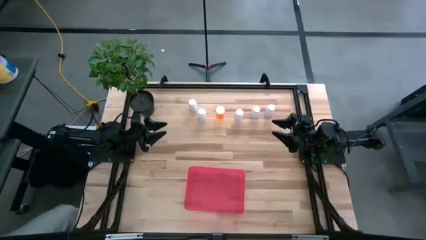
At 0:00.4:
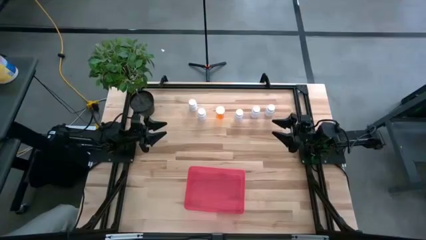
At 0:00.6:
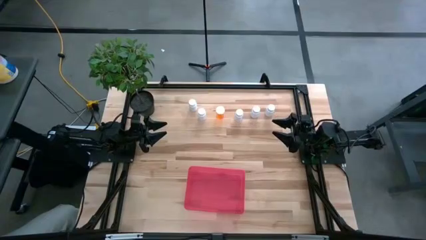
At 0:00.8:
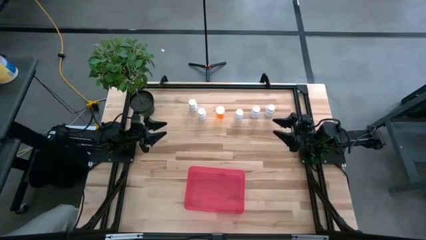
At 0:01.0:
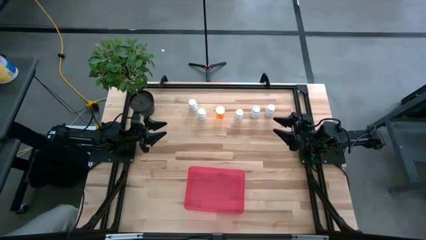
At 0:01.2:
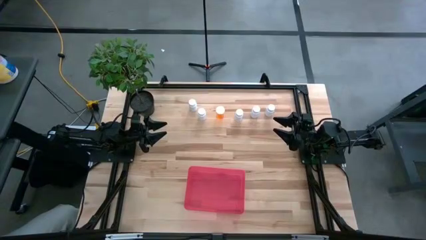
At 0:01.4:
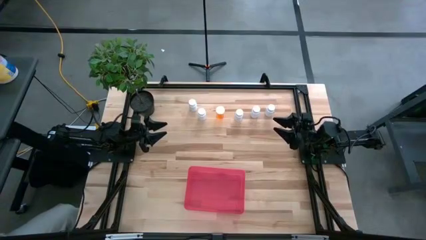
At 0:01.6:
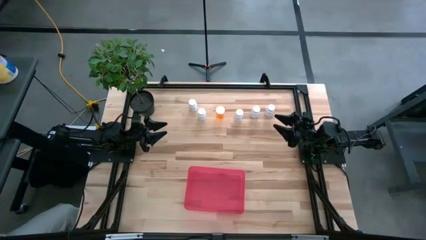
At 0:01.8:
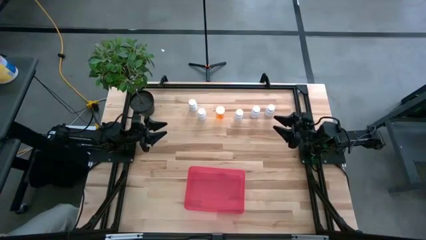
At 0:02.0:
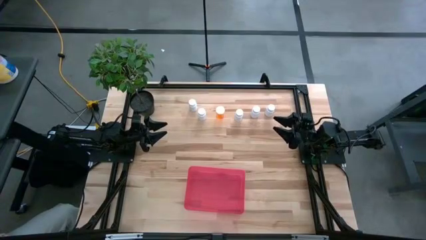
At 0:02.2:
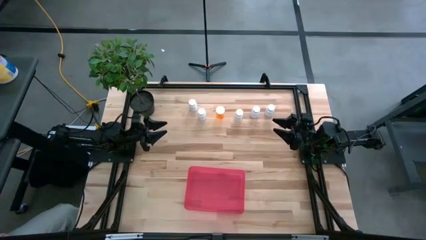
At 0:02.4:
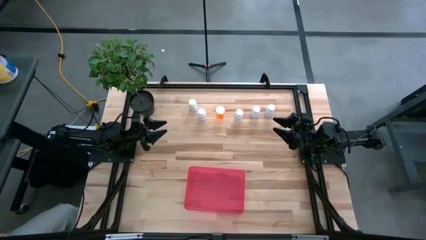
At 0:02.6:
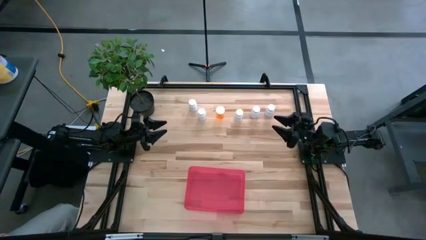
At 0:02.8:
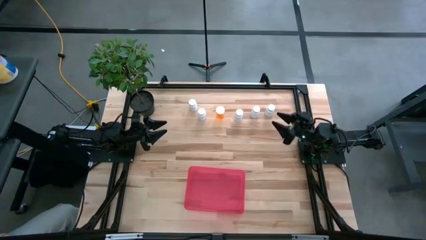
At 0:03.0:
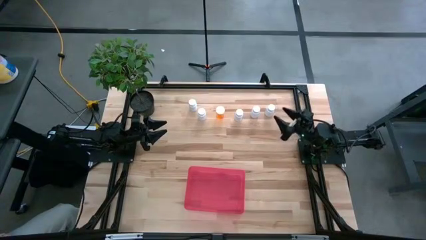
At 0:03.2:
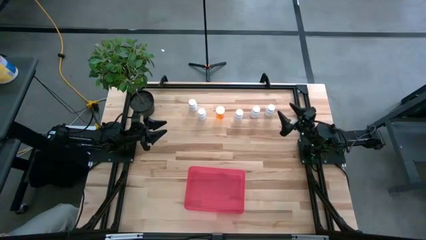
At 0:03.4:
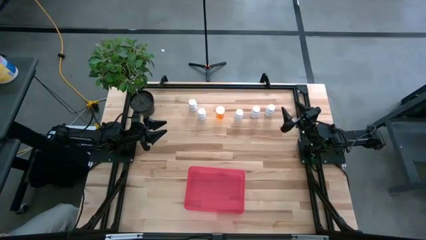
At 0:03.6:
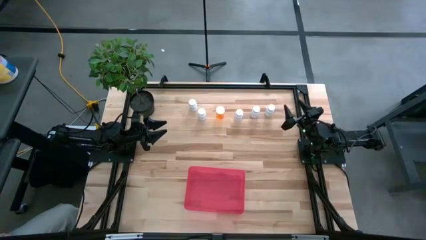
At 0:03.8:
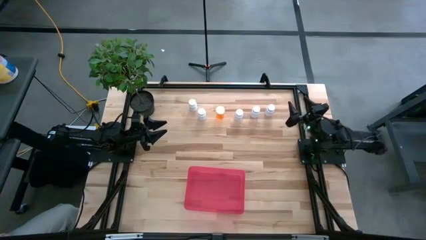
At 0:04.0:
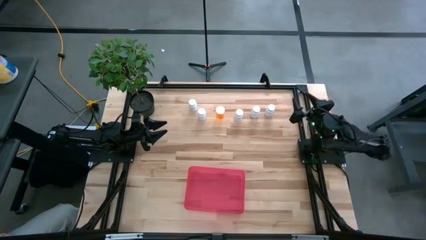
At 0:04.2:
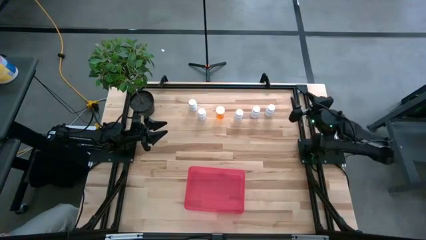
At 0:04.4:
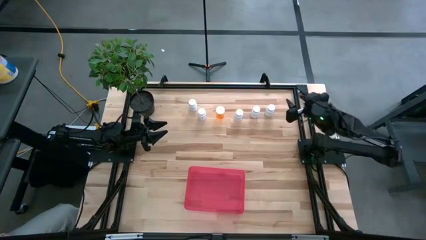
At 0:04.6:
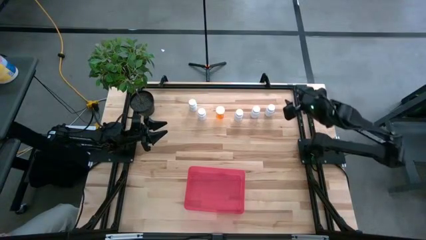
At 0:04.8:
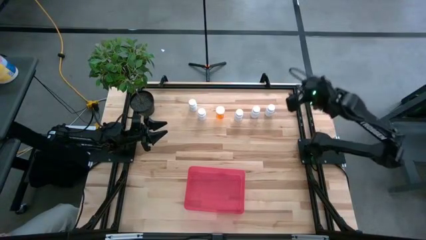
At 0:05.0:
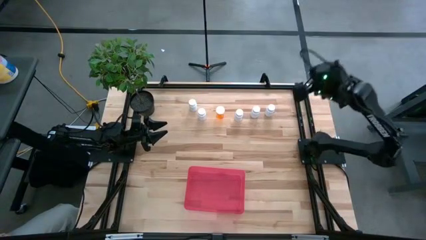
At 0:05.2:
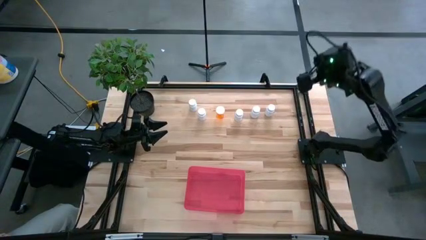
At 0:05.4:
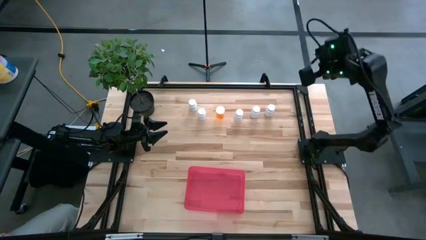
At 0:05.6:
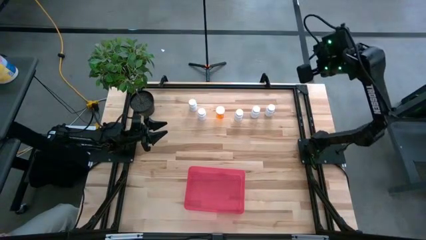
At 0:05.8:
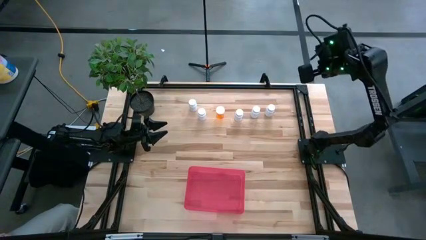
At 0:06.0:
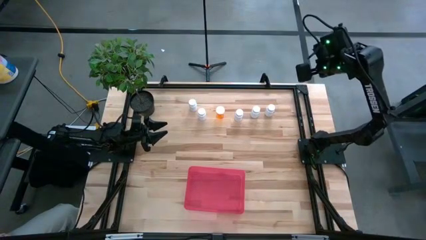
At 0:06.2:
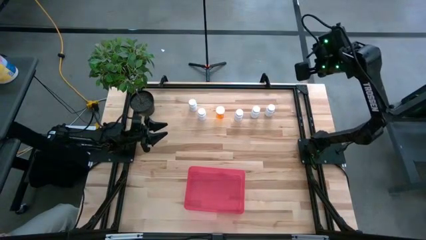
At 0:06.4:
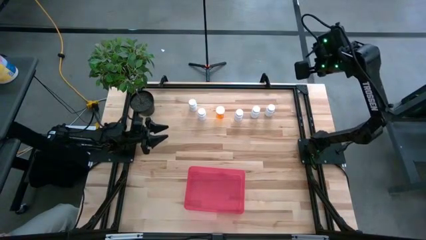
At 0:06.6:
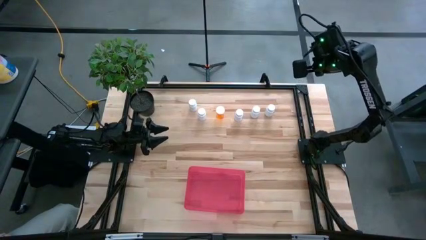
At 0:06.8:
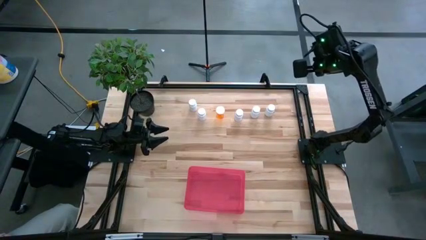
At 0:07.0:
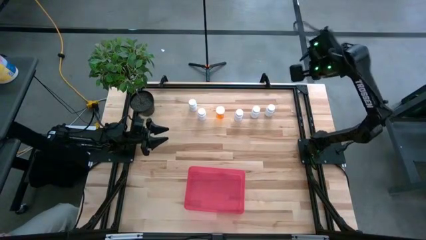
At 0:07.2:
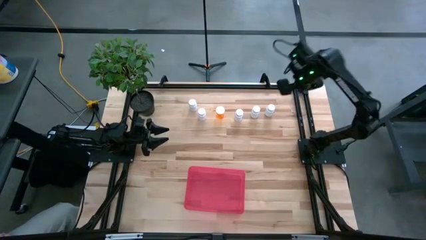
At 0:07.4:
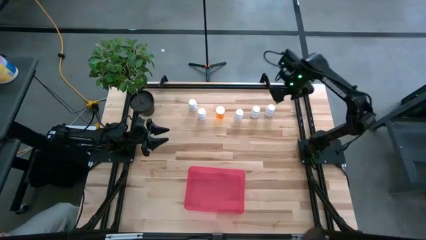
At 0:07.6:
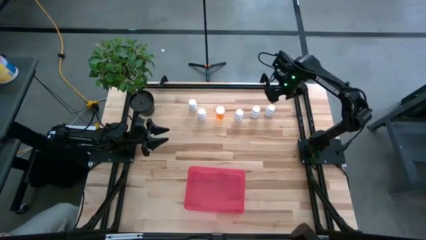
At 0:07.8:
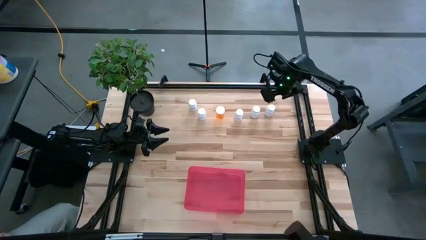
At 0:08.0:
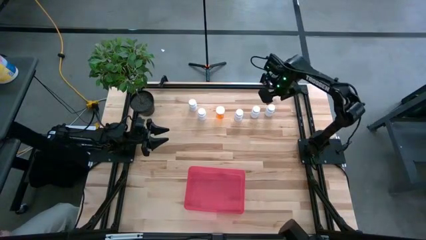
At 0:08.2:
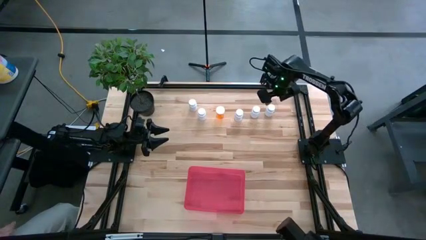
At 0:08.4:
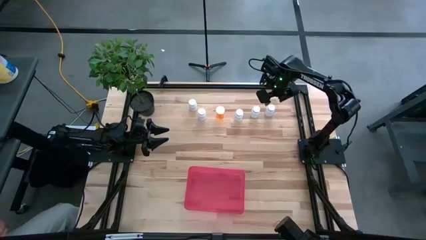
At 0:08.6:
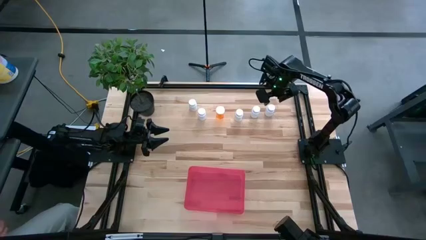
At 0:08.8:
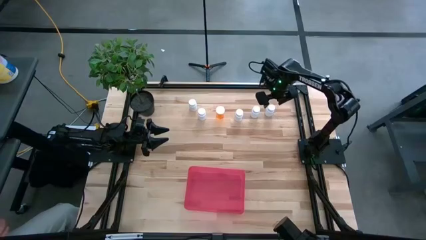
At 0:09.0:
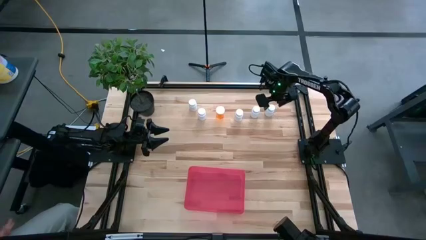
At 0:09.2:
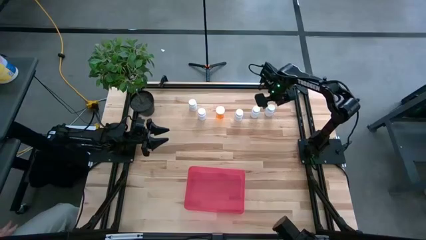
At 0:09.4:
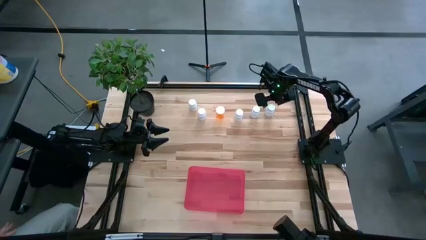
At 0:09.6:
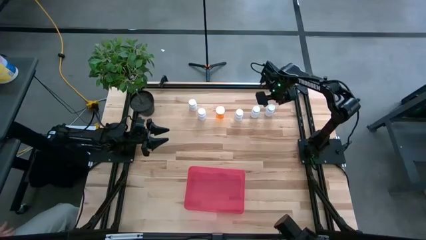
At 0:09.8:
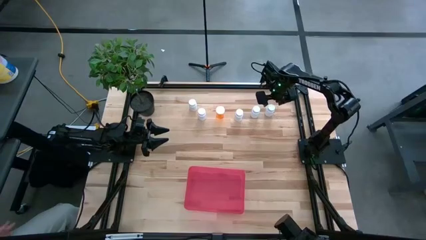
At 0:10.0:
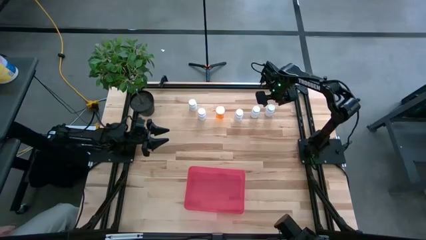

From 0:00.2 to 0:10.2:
Task: Pick and place pill bottles into a basket
Put the white pill bottle into the red bin
